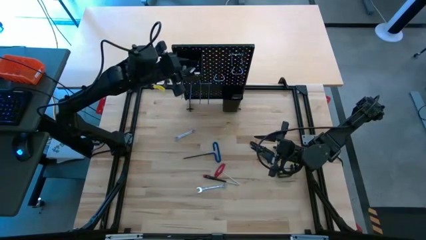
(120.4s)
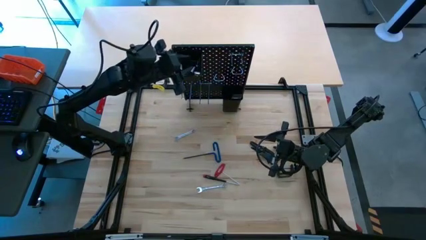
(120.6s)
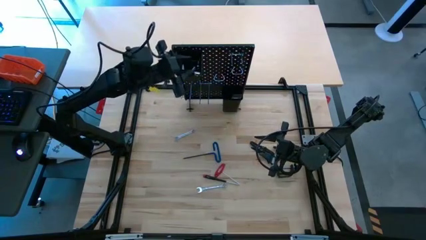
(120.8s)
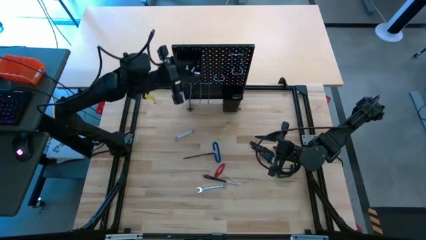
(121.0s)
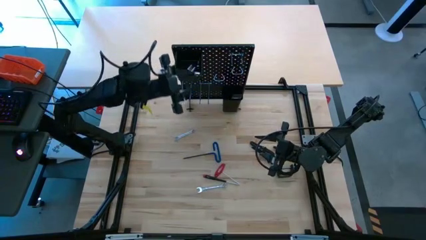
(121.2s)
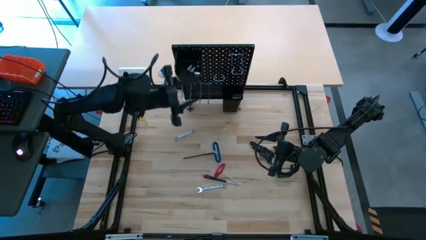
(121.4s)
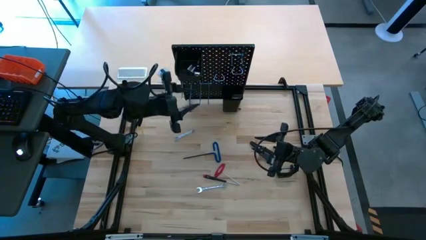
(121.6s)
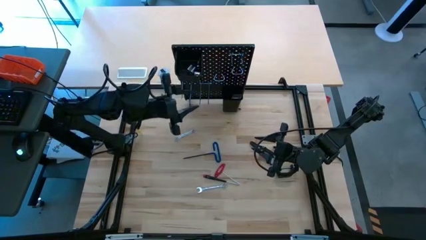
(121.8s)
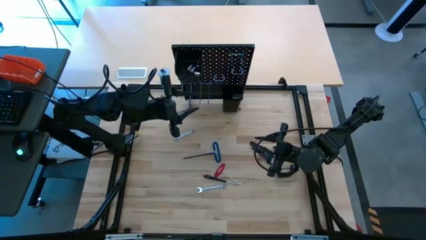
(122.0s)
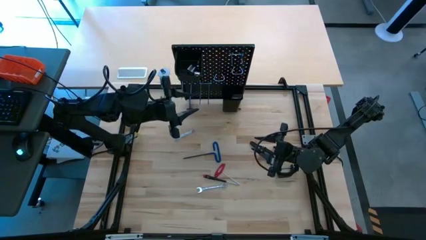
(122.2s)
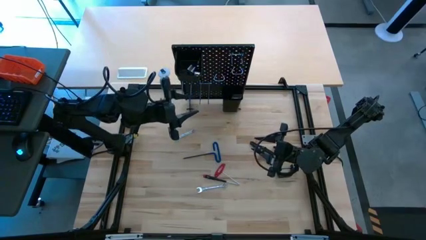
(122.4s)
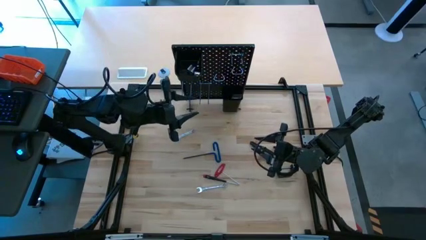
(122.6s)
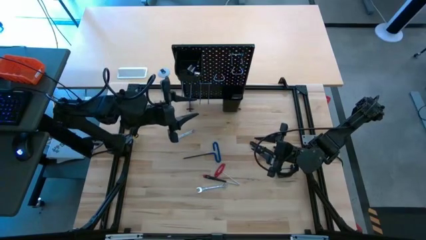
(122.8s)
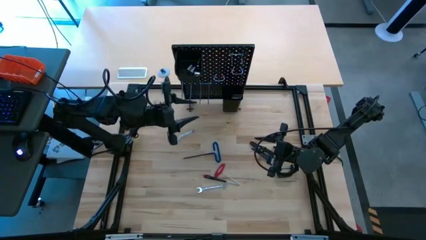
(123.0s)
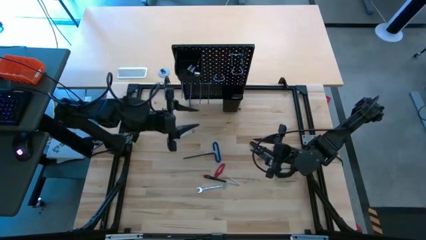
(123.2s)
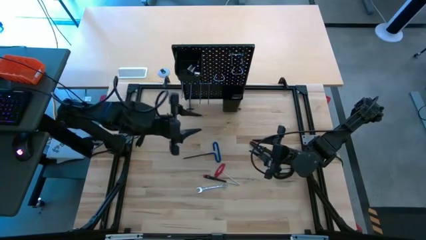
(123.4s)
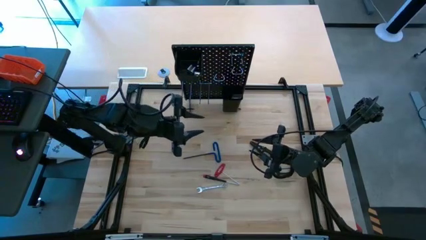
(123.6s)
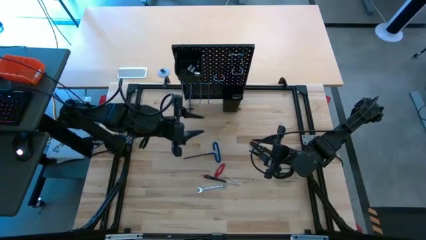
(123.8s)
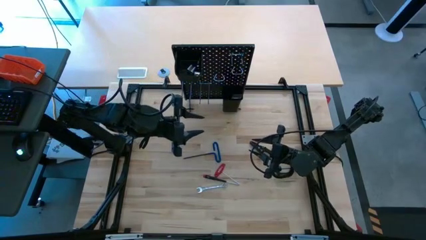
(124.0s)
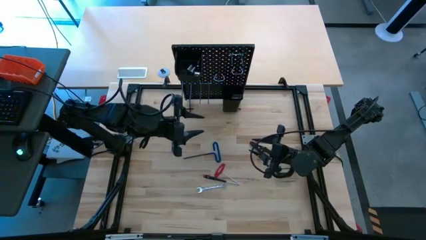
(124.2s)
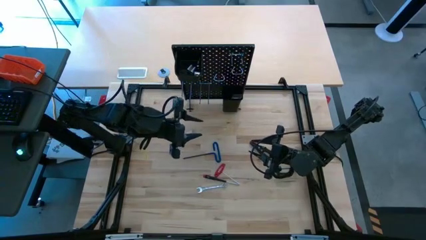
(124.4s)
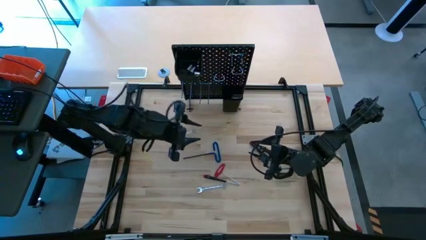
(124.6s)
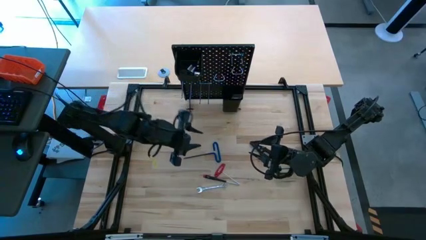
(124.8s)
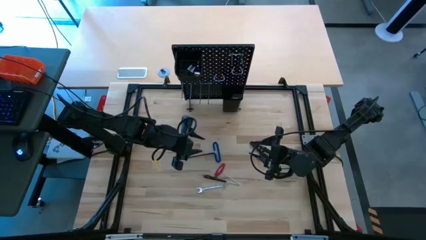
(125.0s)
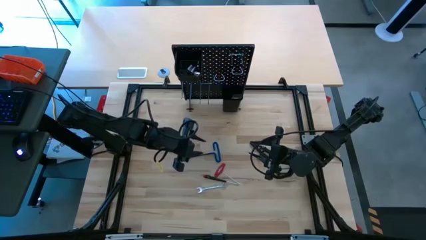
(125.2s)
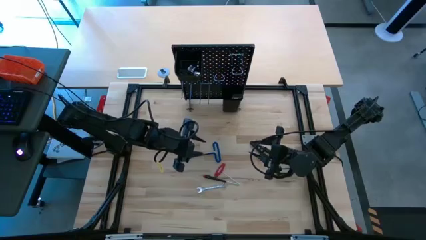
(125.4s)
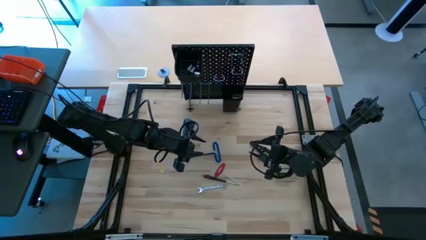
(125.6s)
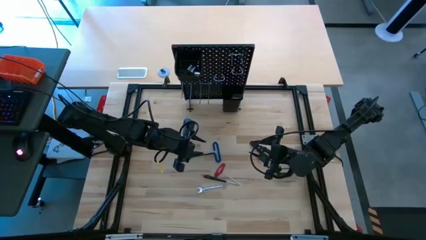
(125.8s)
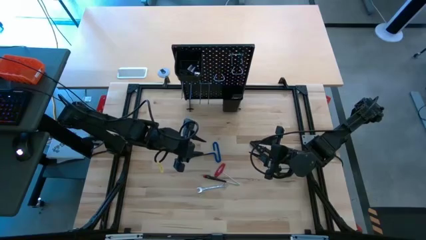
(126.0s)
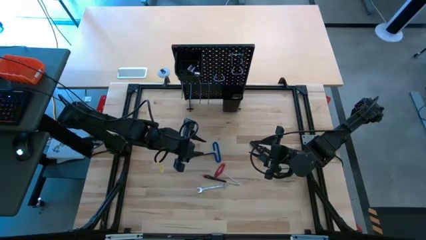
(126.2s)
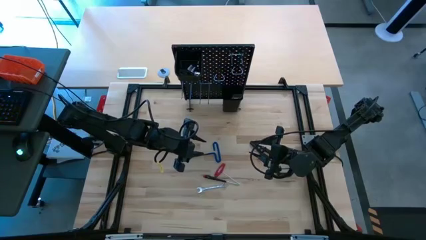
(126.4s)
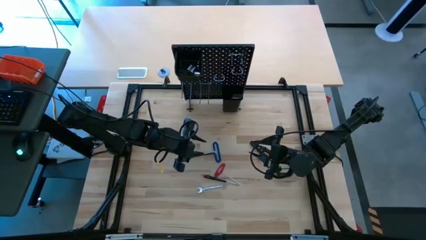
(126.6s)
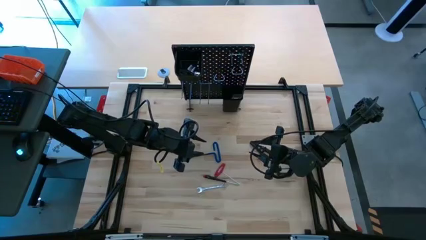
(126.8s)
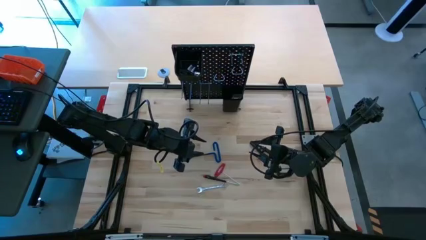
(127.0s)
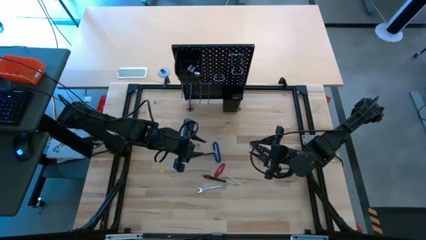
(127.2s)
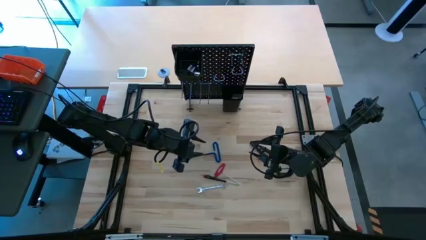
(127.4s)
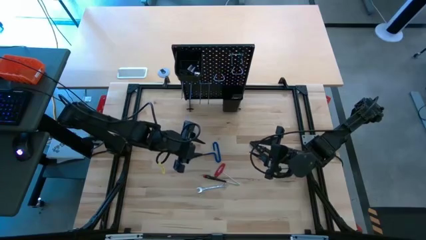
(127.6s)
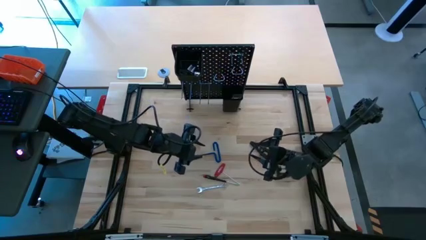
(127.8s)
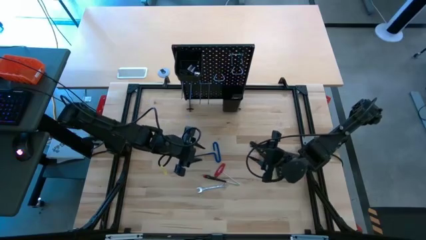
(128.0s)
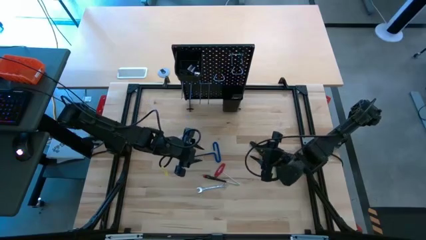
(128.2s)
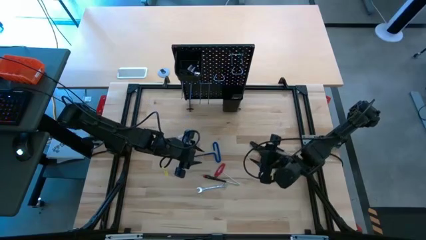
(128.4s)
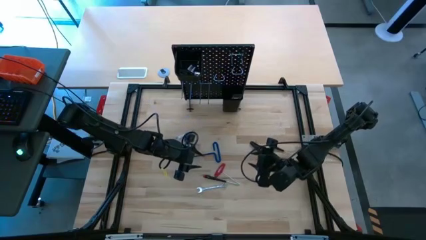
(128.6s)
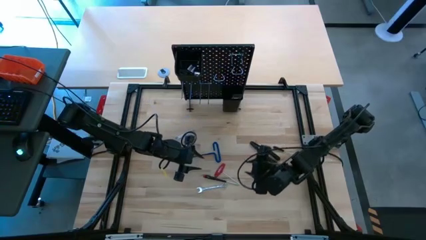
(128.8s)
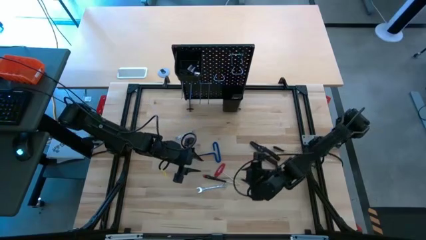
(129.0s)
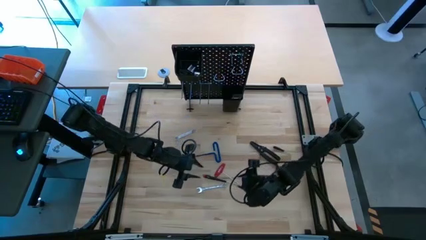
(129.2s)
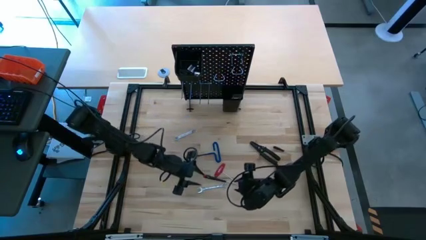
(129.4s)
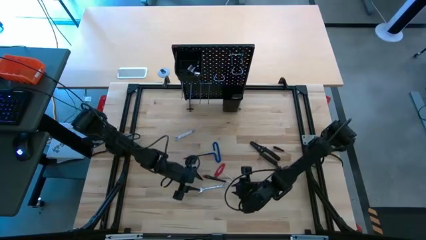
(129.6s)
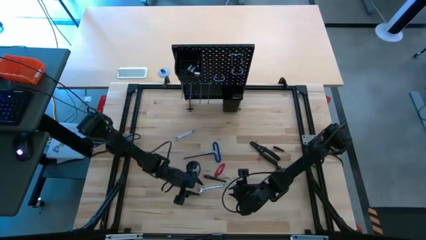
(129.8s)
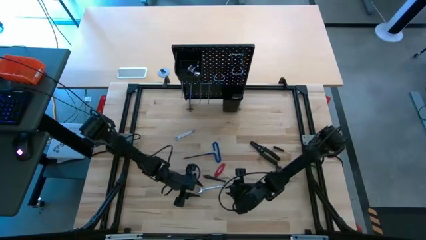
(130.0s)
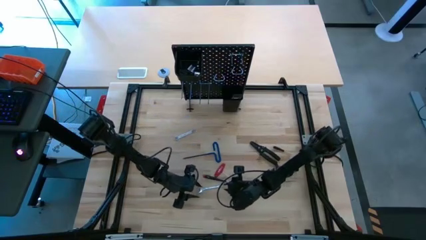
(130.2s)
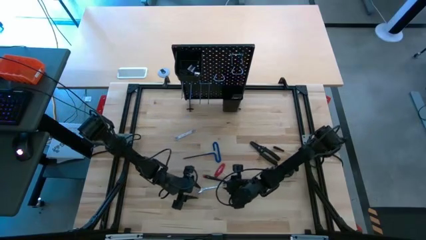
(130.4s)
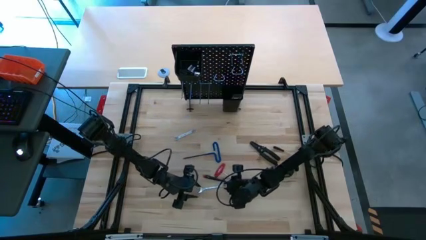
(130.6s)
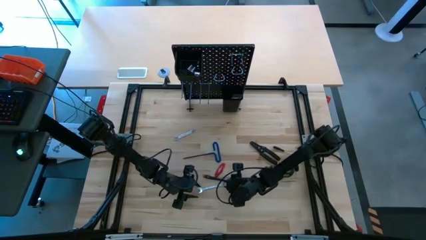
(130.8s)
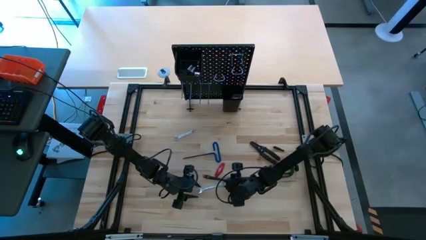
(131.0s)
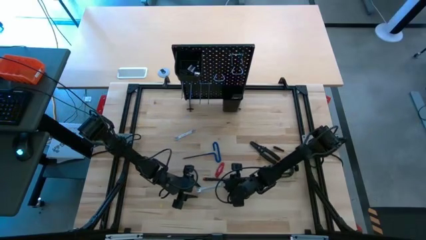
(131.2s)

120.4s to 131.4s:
Task: Hang tools onto peg board
Hang the wrench on the pegboard
